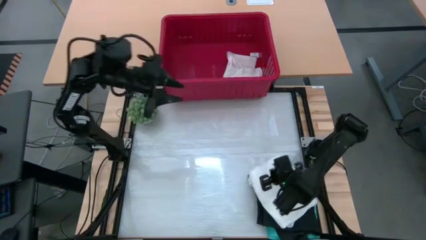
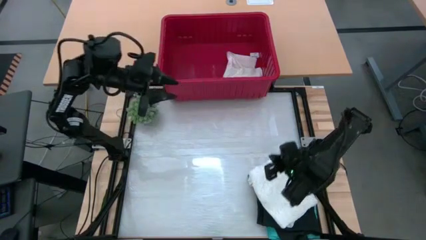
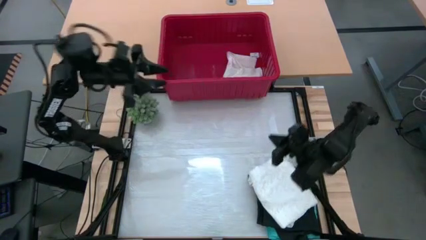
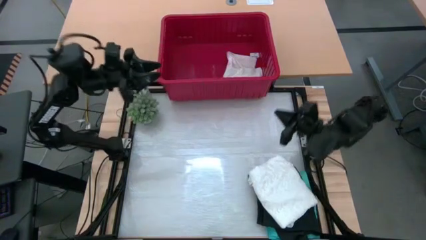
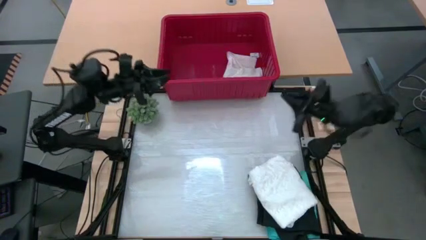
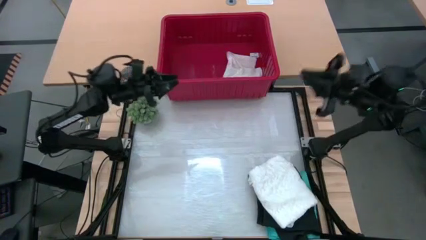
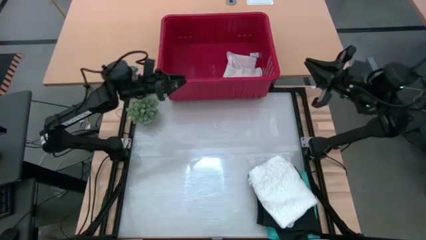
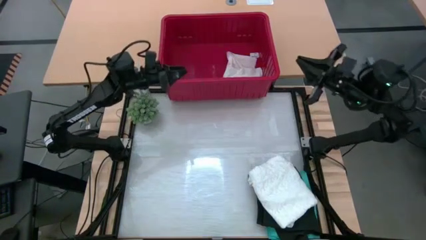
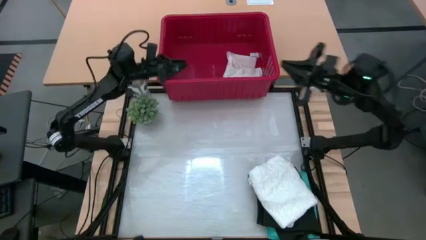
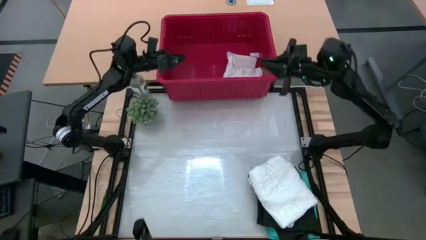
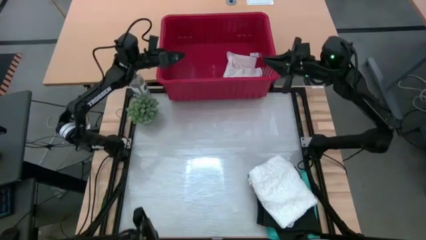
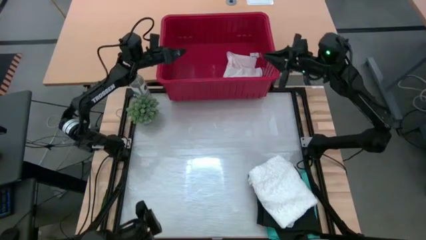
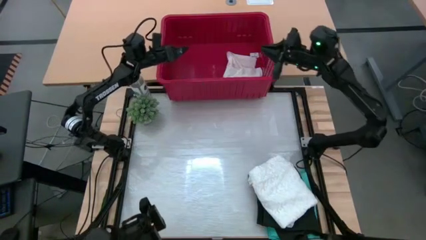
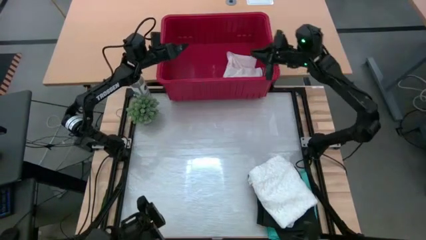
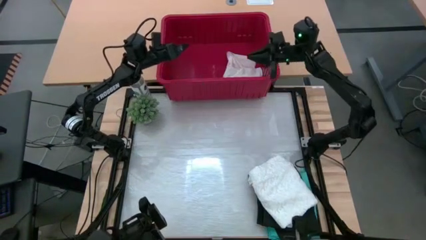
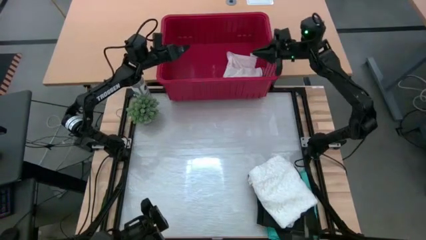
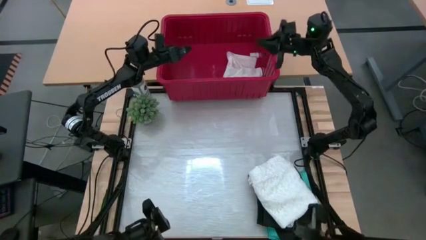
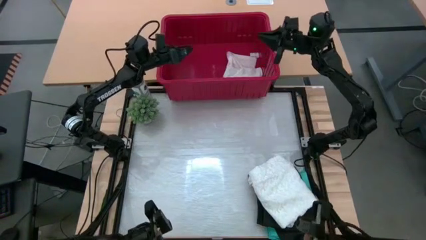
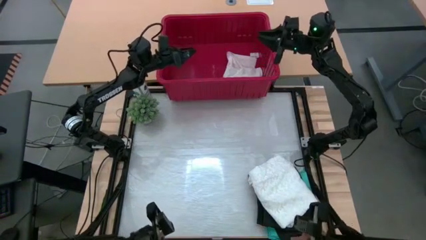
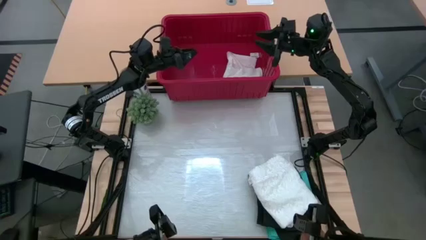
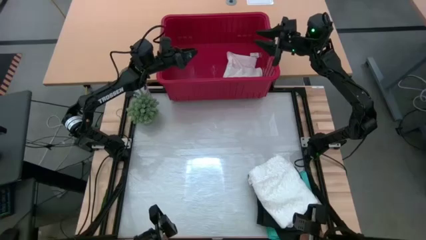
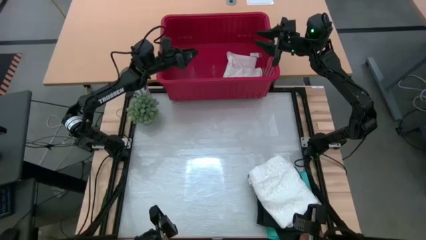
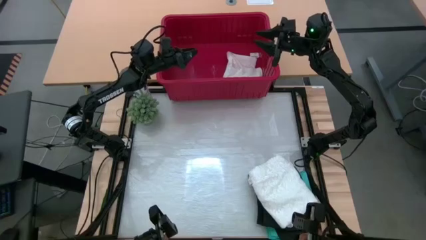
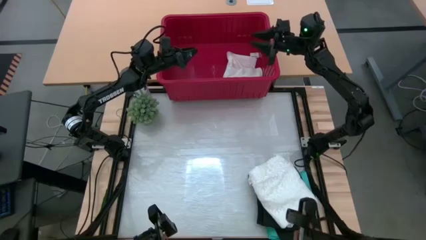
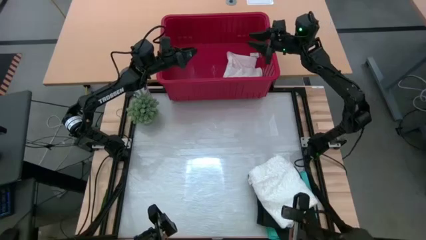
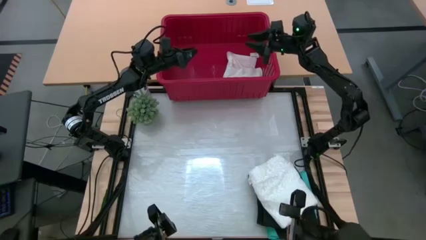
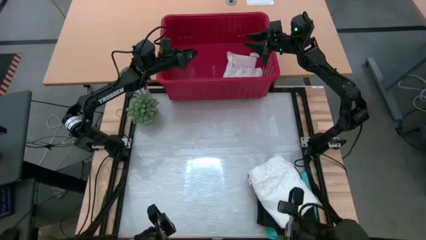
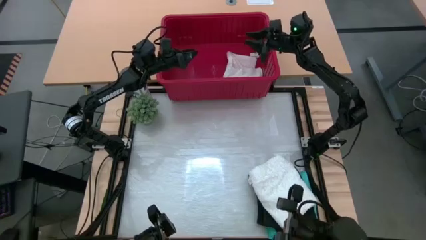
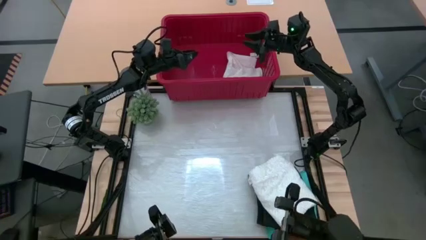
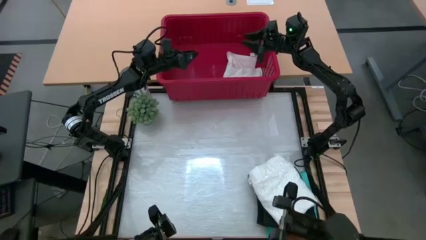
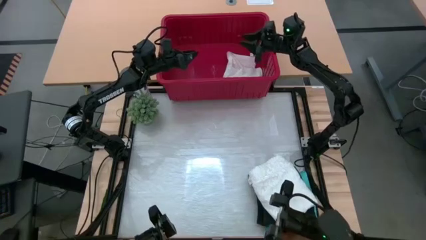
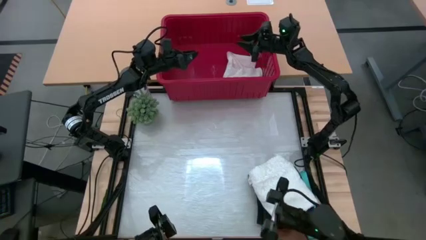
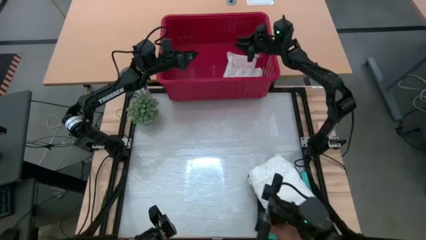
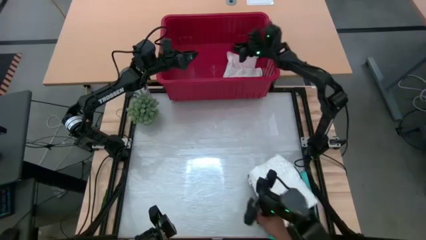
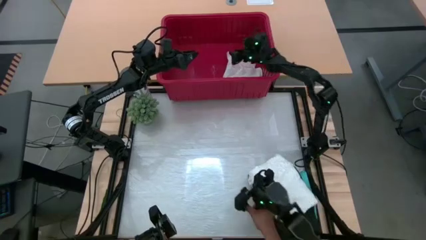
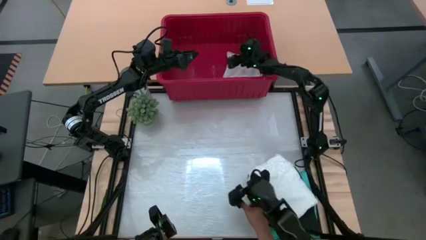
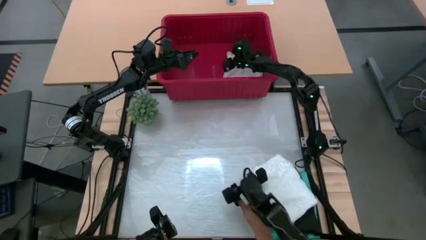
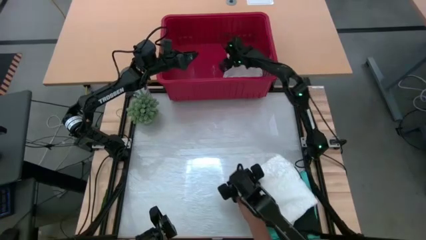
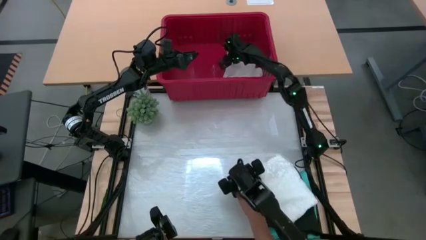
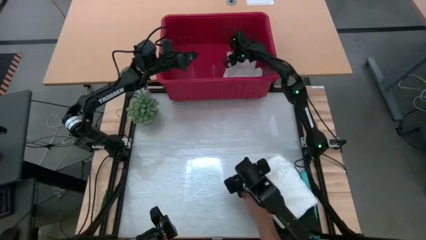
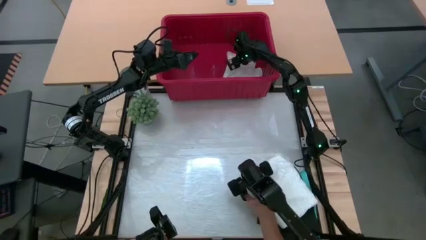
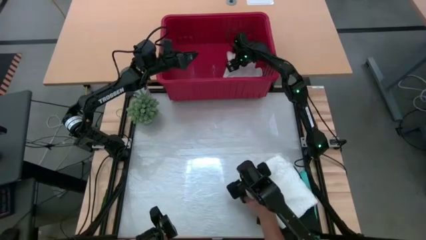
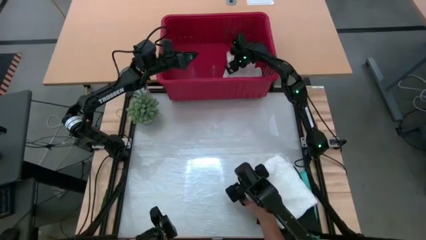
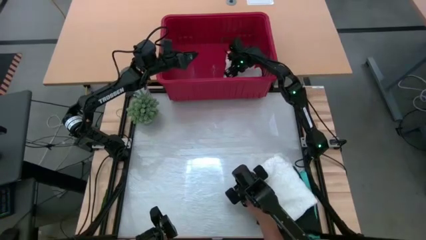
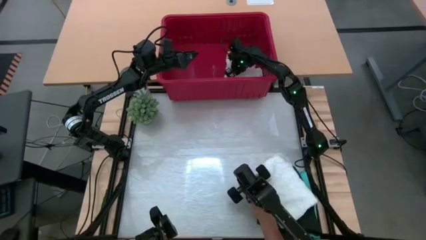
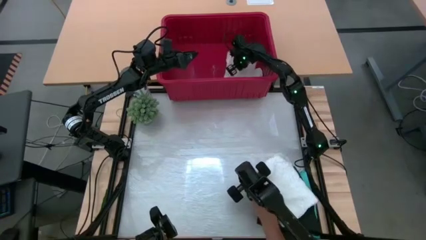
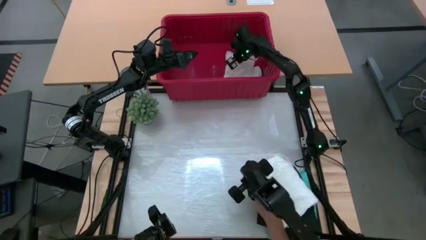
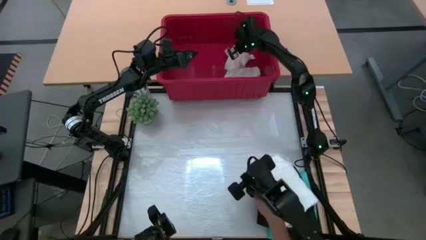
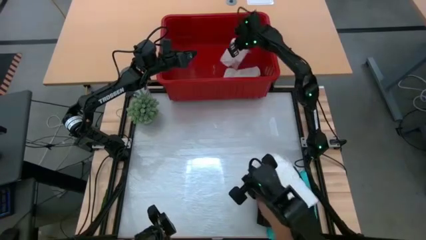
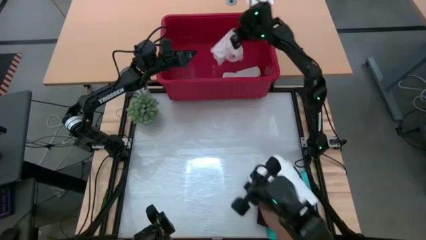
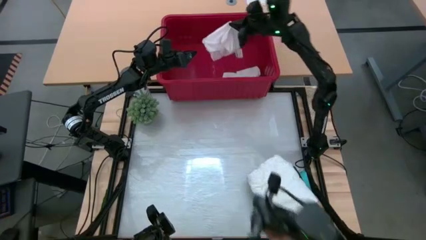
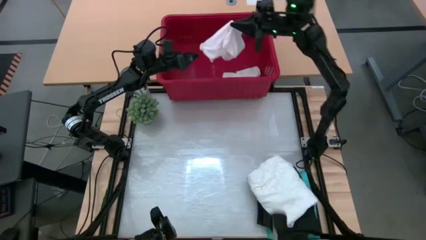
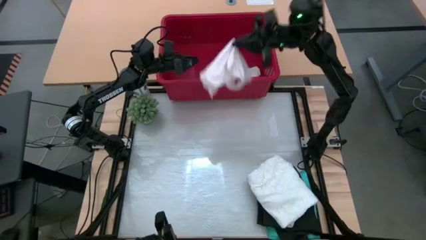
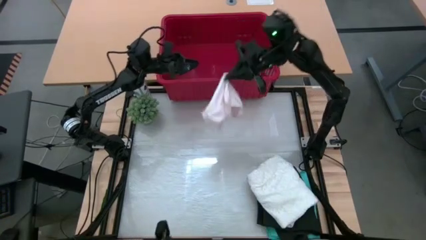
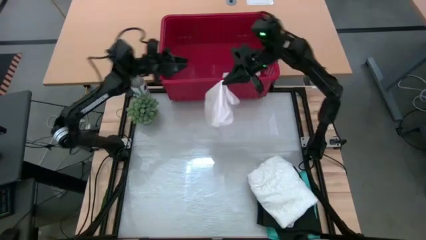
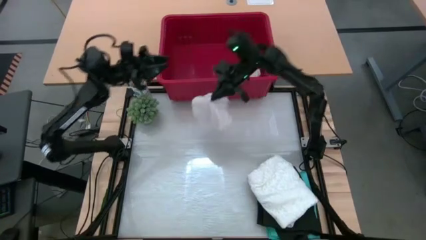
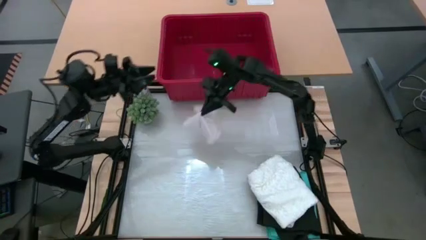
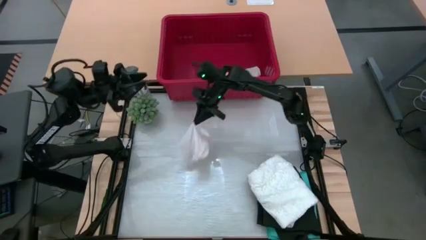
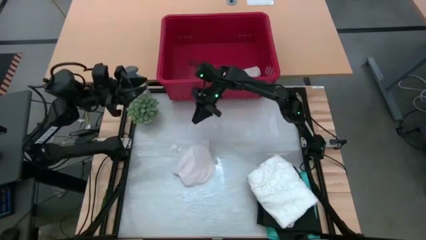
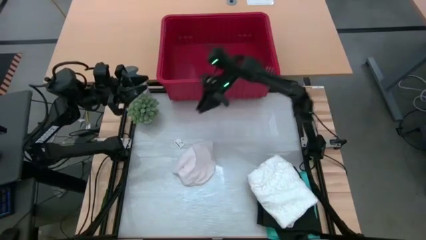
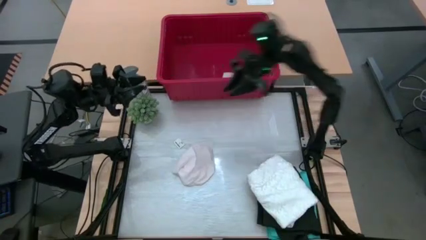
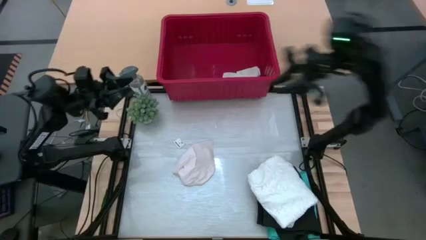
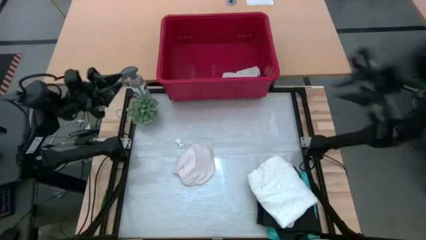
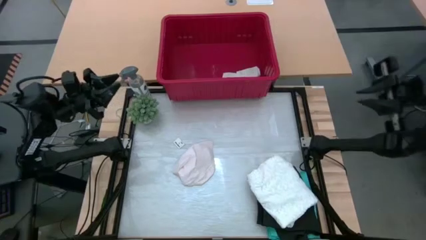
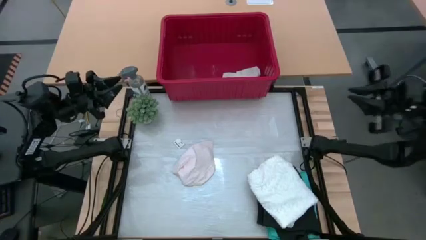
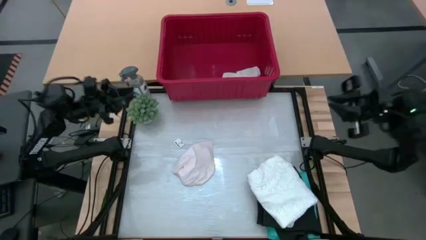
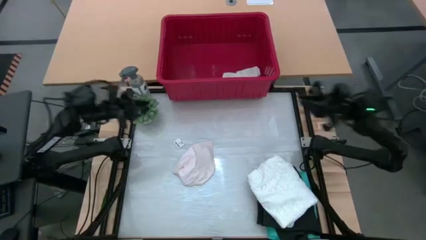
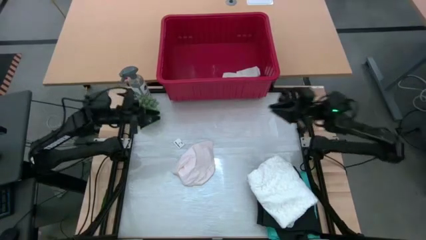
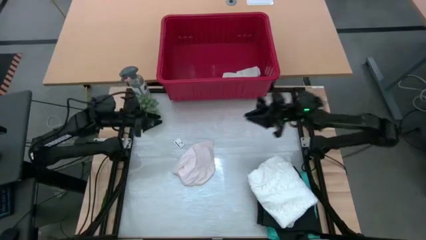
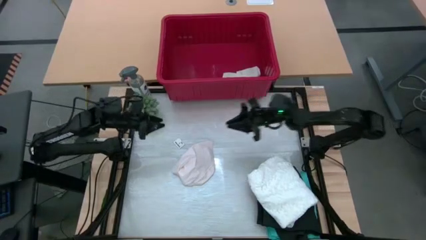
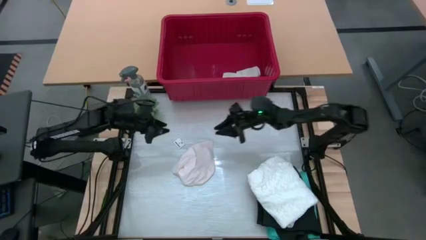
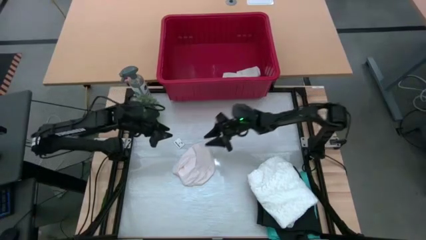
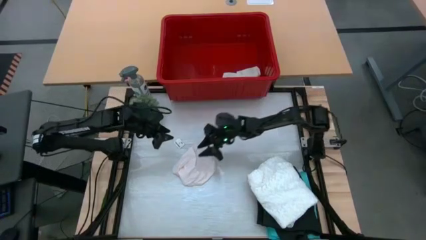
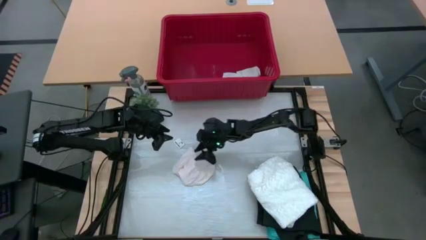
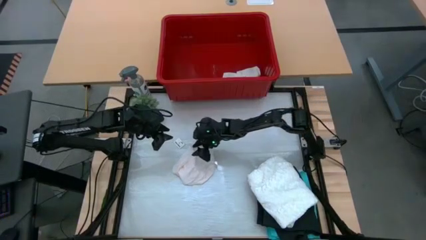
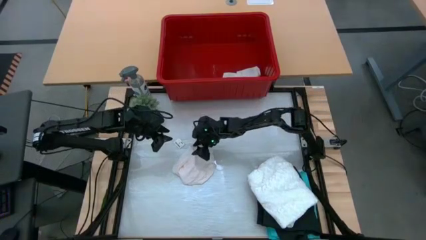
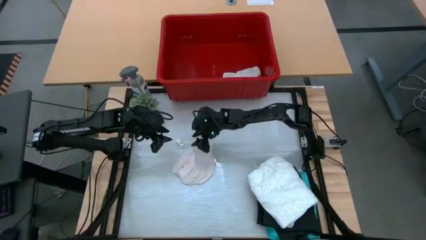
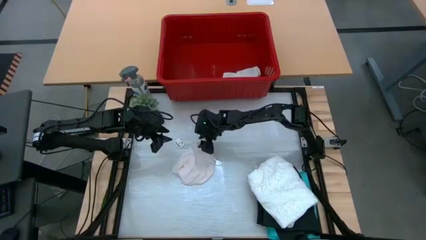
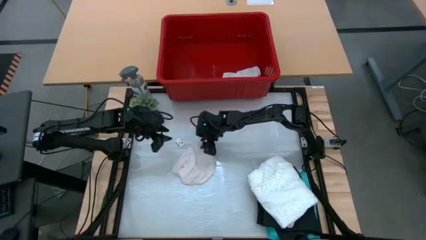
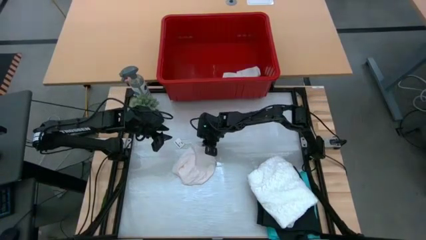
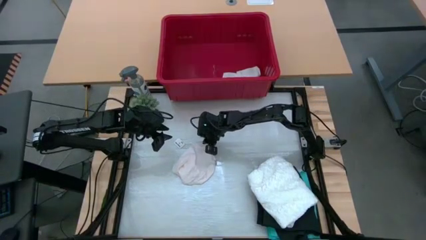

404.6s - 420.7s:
Task: Fold Laundry from Bin
Fold the white underwear
